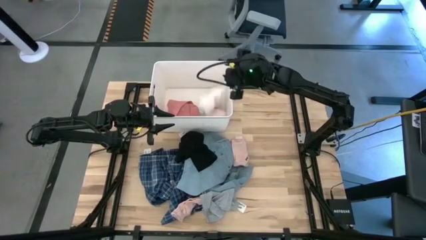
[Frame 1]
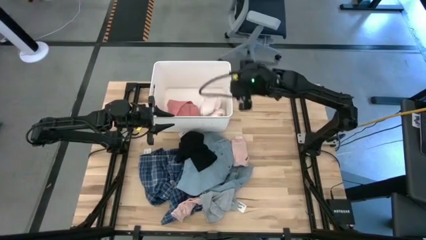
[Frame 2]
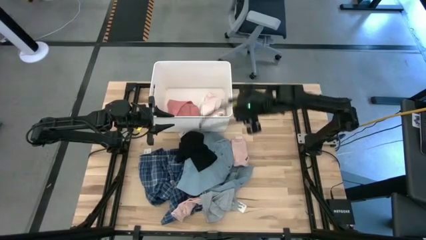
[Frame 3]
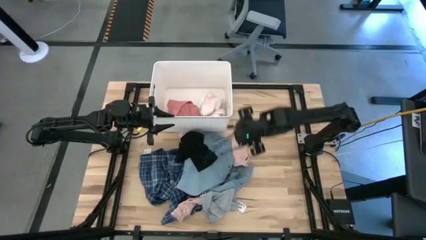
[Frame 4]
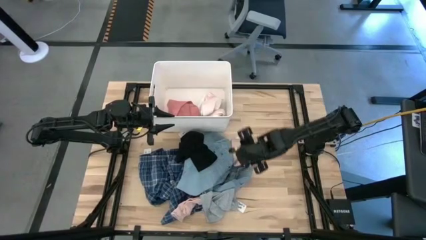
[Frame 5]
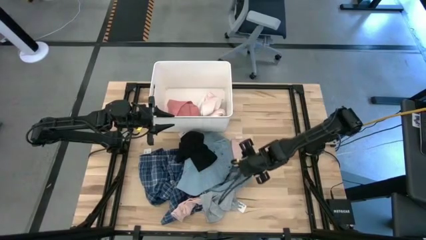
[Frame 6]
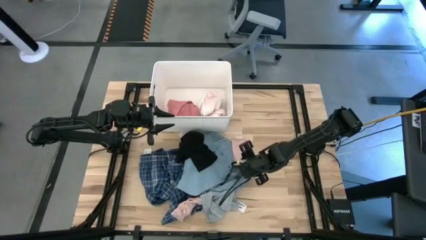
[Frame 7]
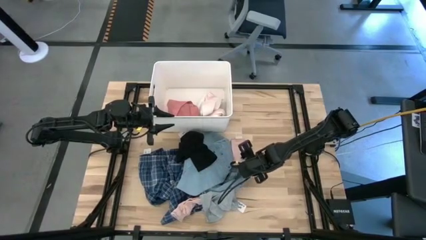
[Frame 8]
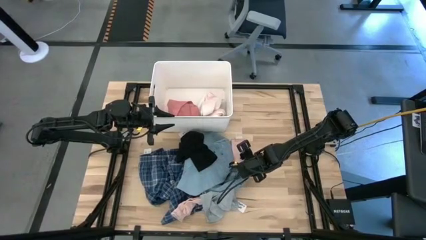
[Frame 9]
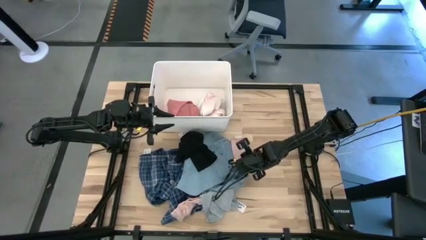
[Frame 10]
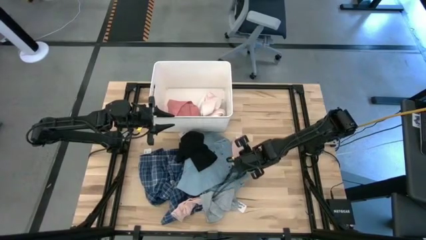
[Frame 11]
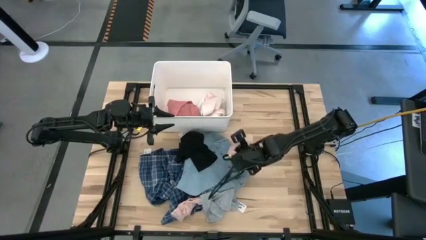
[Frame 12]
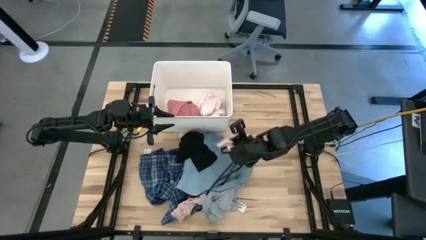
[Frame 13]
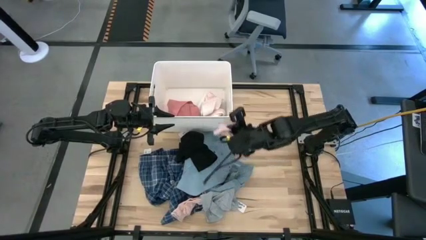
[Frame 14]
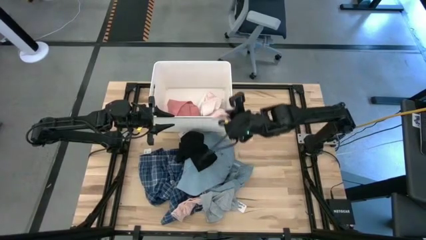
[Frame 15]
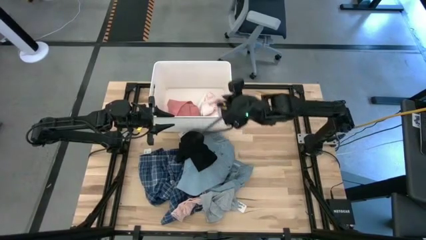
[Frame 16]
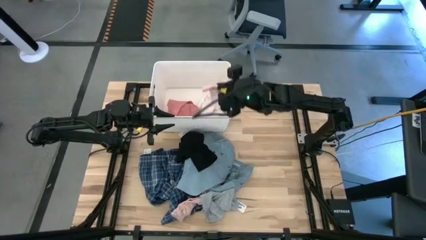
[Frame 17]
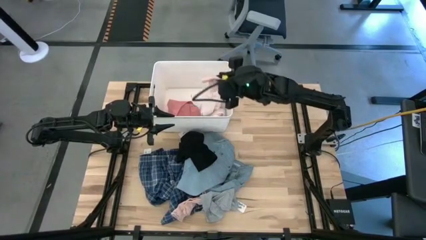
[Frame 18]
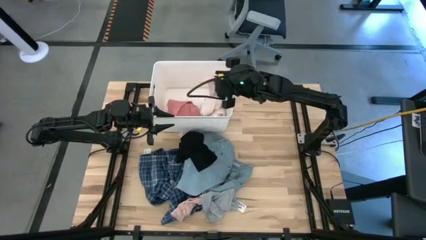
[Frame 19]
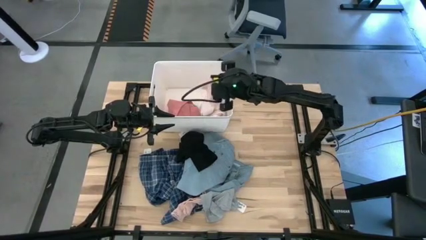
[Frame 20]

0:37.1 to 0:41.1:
Task: Sort clothes
Put the top pink sock into the white bin

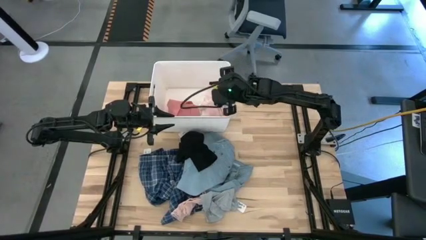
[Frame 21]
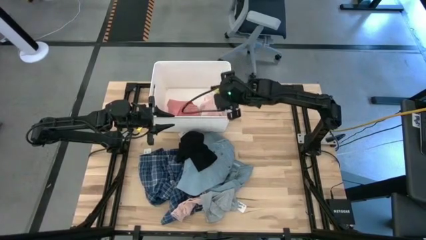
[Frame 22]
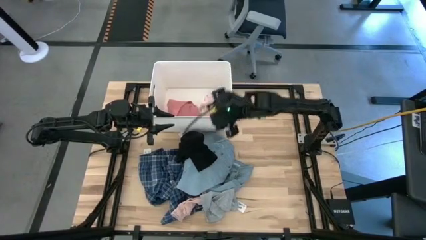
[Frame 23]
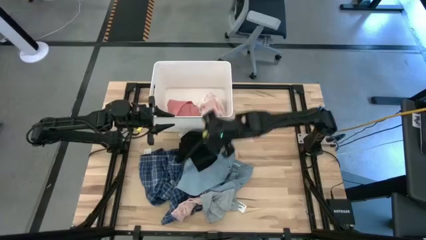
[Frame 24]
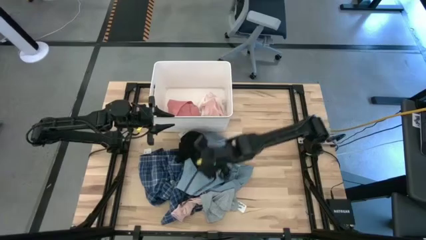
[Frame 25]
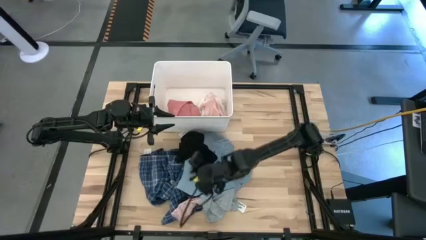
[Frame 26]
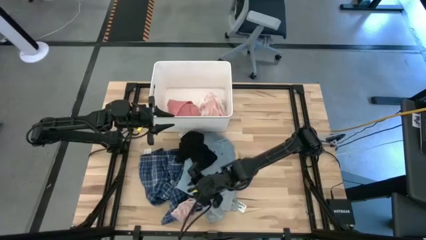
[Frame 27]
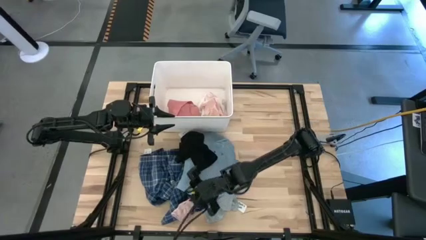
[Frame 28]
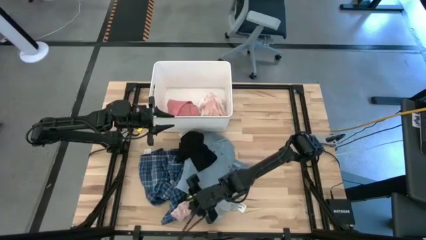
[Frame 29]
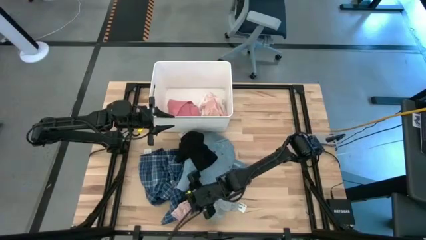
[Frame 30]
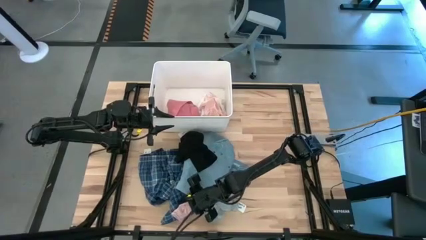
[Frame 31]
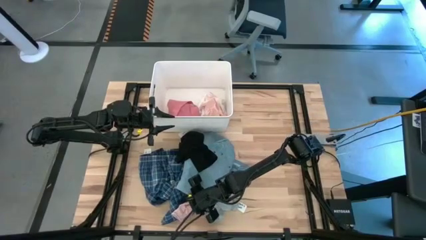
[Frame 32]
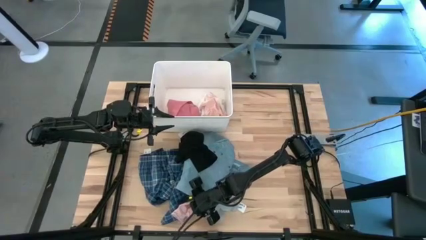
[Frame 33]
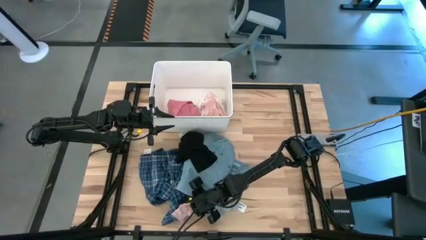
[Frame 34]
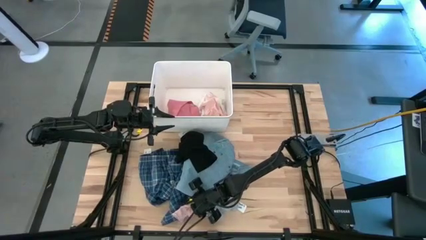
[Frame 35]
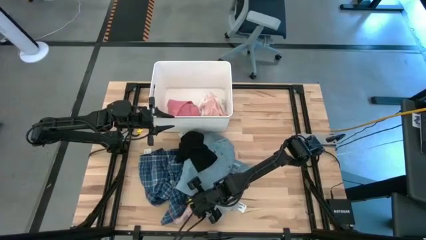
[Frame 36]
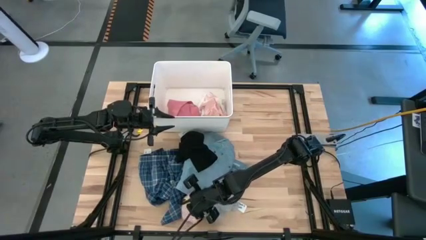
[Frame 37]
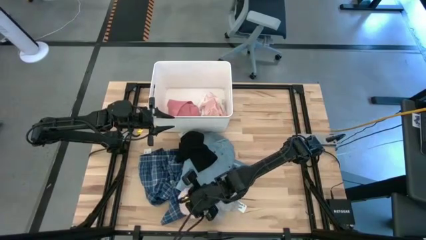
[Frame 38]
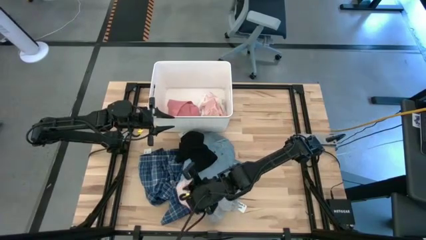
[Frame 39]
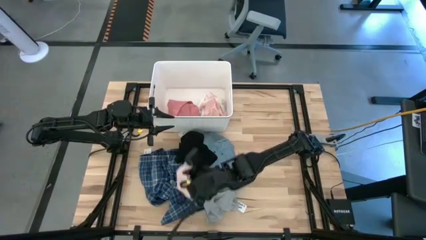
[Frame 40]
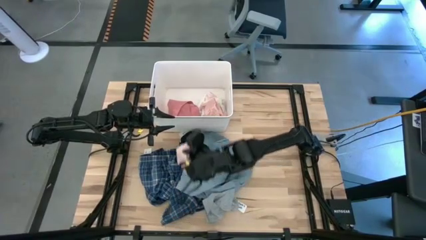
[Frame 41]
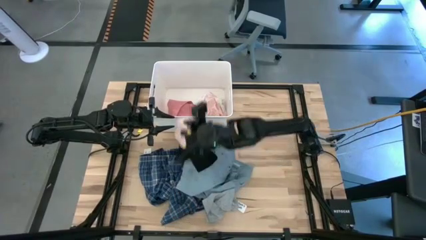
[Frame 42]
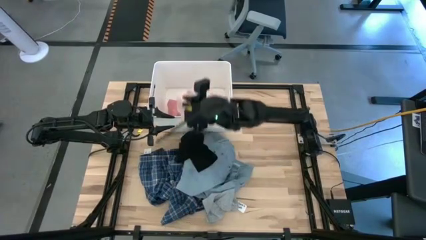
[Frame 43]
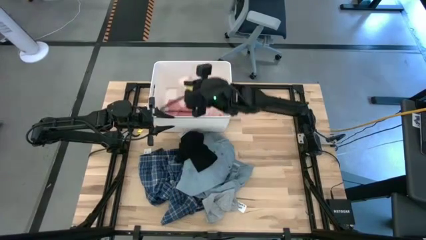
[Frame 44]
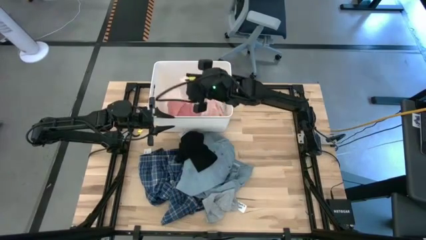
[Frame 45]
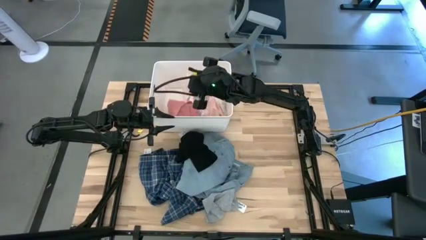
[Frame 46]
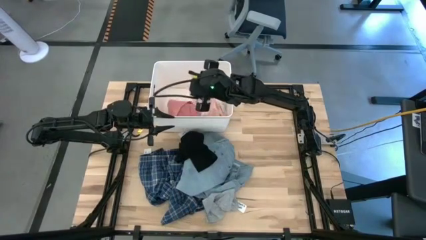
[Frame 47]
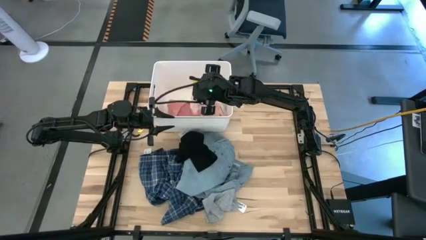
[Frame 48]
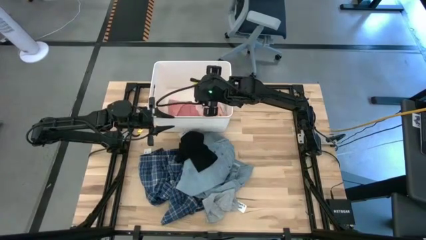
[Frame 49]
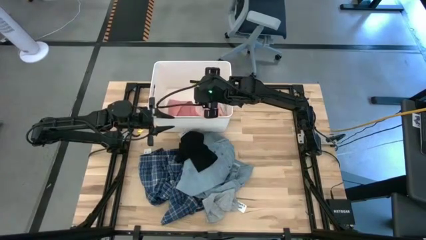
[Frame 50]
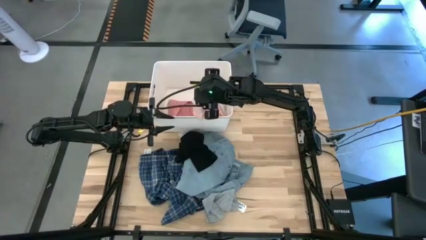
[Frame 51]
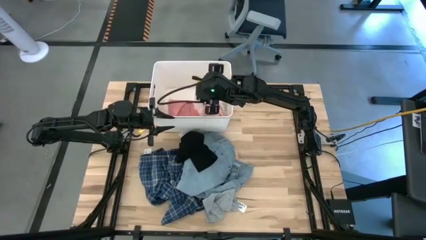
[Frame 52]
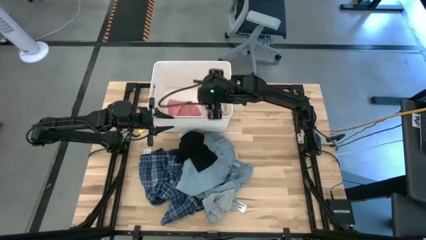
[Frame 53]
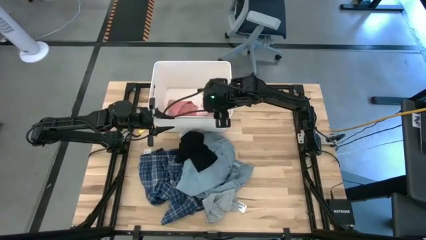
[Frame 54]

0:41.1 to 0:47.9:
Put the pink sock into the white bin

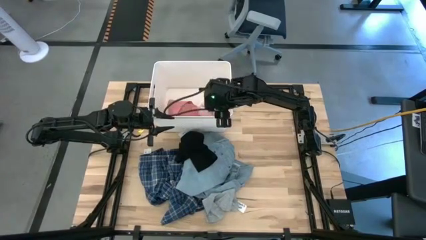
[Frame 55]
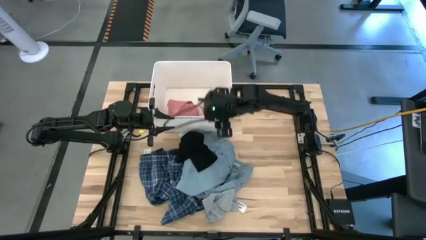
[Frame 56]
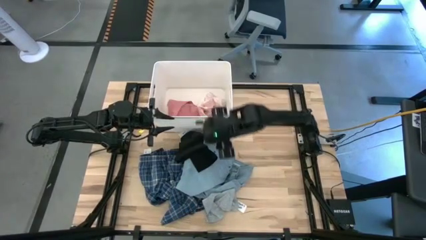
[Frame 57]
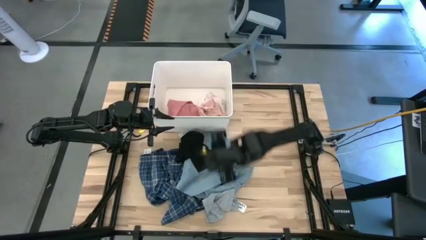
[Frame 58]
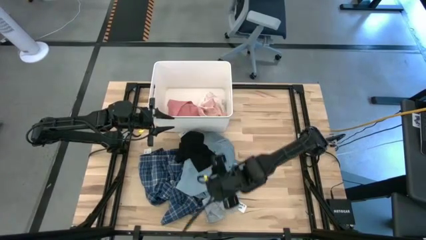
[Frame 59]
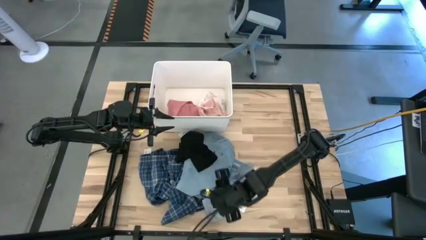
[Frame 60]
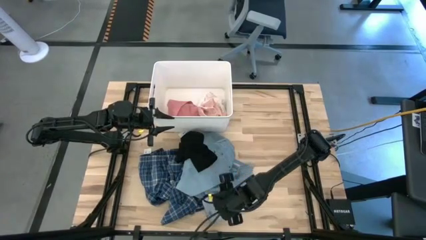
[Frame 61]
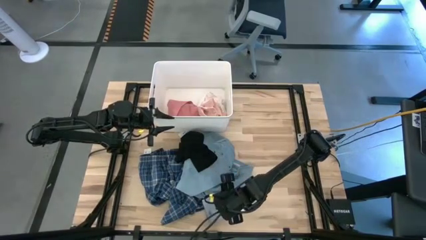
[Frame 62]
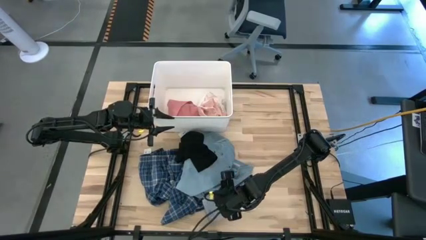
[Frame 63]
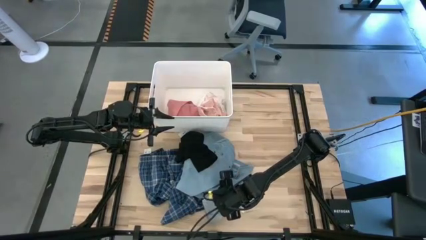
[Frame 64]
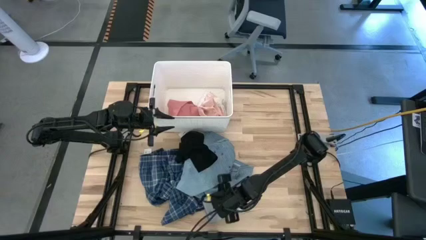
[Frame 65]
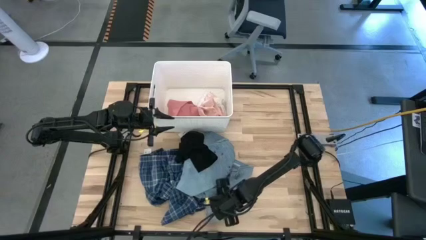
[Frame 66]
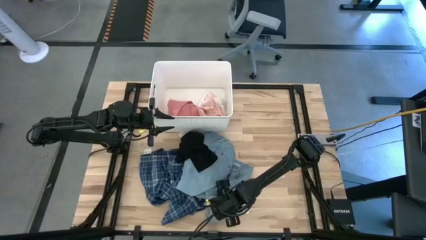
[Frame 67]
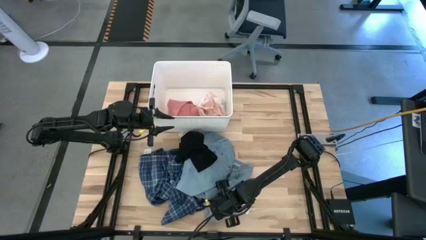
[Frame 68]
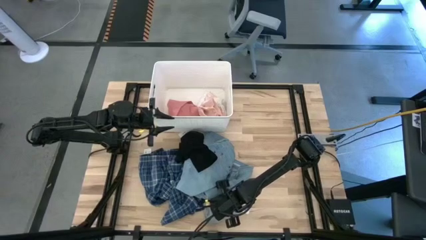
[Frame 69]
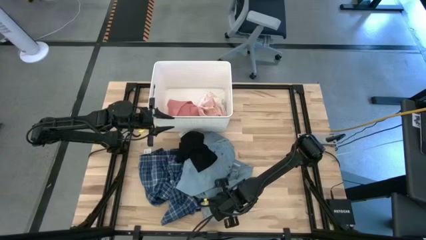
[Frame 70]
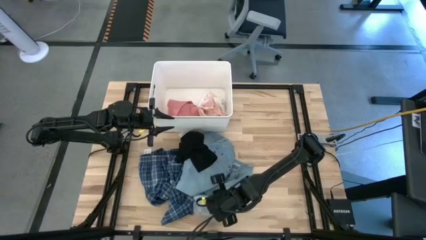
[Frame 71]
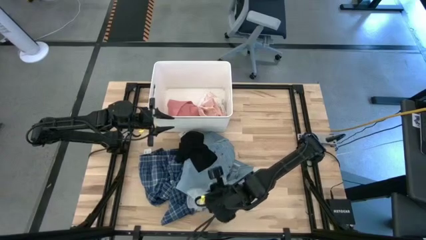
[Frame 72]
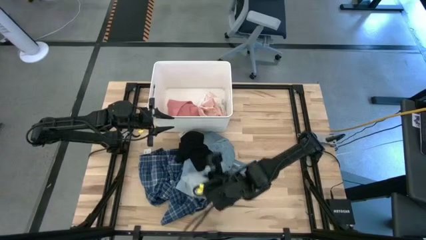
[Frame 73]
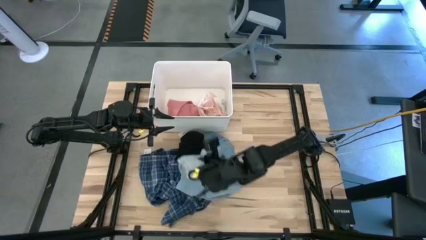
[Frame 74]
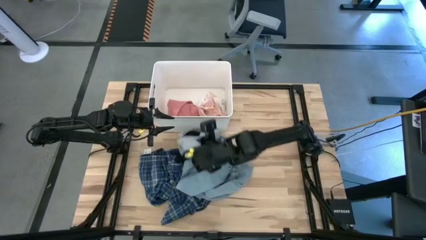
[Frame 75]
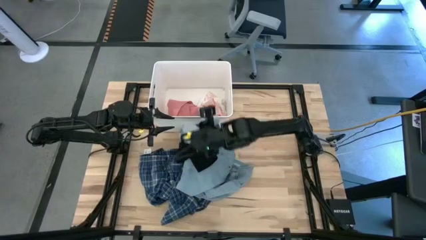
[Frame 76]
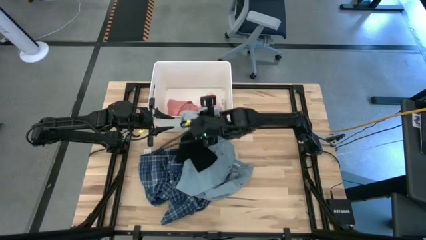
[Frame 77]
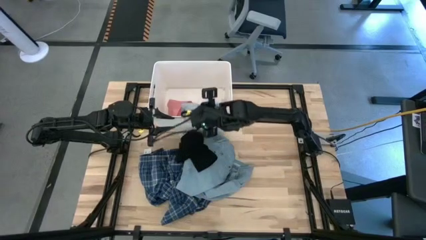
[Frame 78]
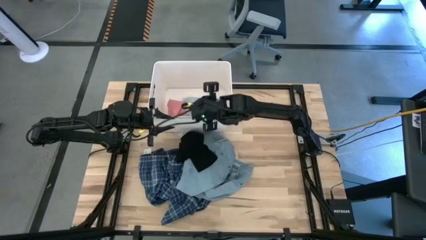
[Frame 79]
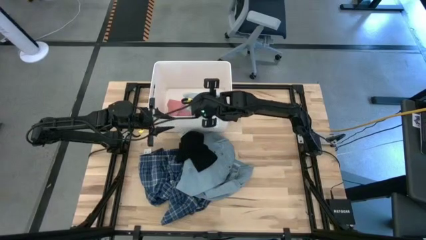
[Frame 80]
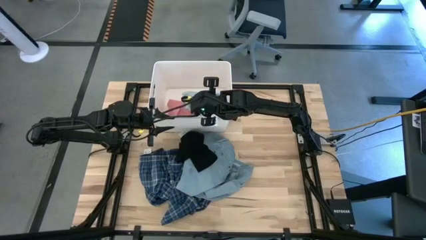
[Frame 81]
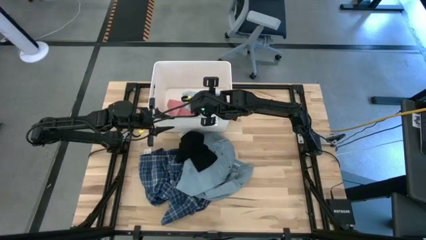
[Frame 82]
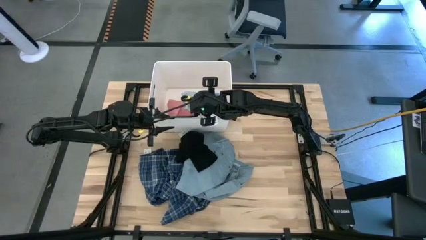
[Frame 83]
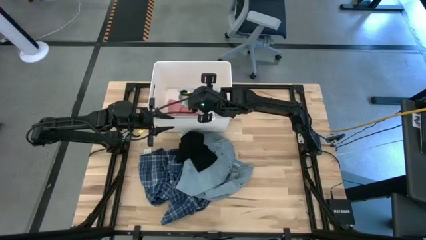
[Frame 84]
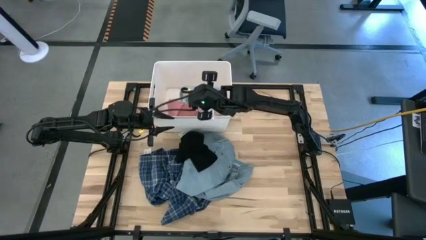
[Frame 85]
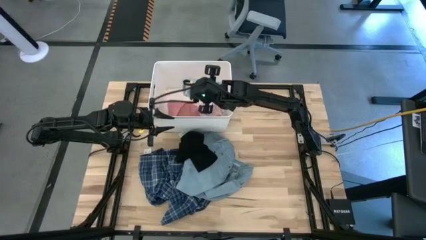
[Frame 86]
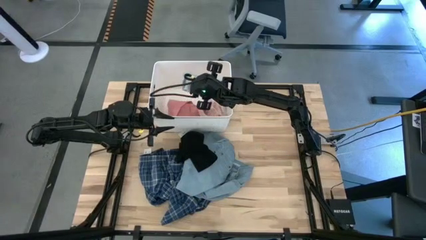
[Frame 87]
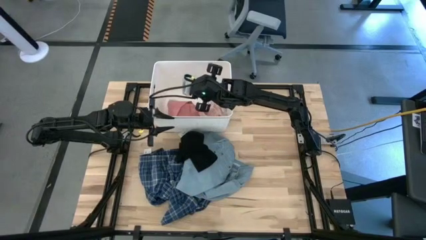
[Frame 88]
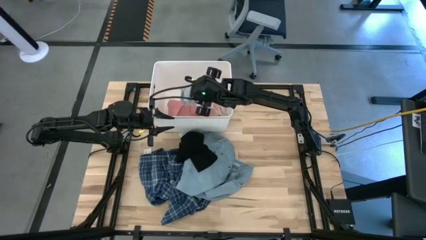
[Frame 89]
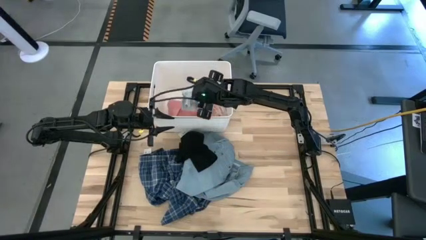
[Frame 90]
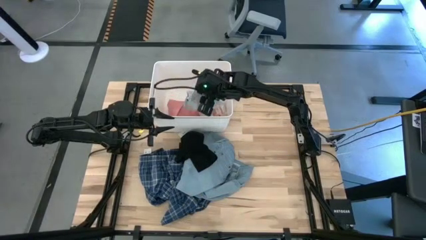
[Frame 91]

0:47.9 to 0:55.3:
Put the gray pants into the white bin
